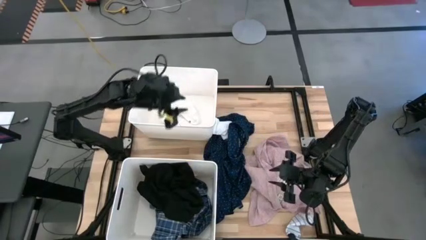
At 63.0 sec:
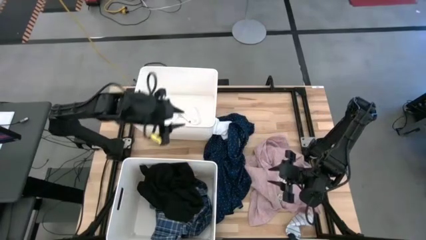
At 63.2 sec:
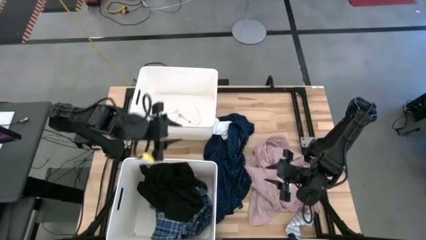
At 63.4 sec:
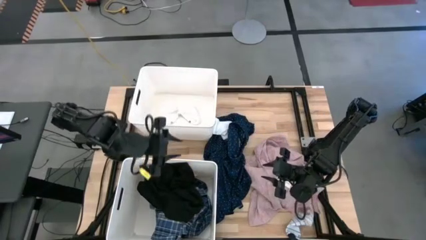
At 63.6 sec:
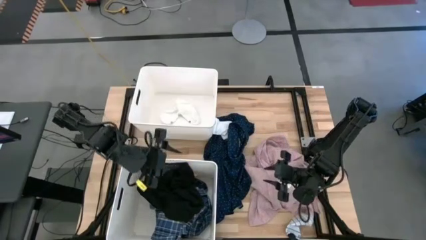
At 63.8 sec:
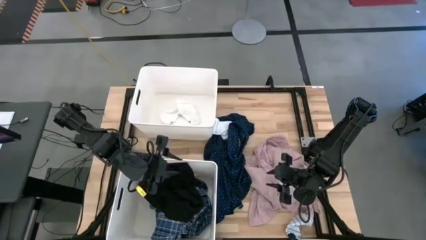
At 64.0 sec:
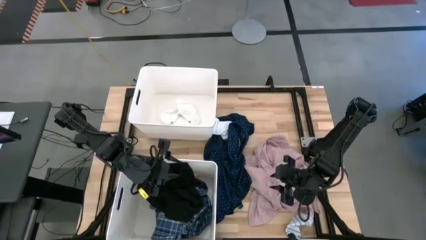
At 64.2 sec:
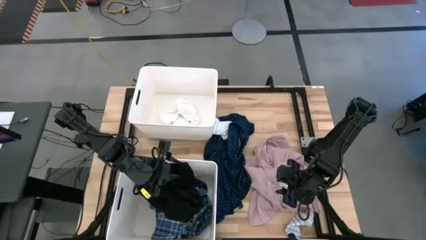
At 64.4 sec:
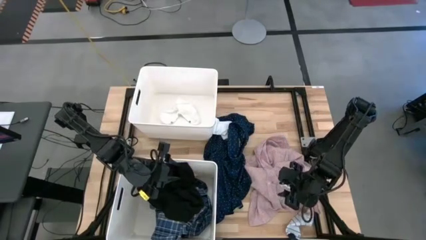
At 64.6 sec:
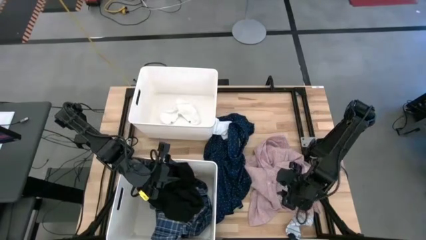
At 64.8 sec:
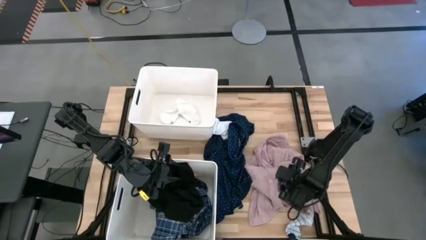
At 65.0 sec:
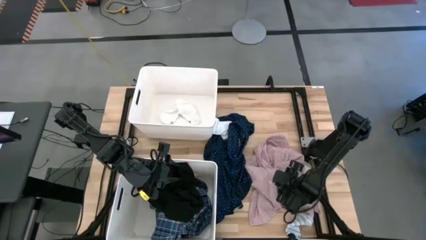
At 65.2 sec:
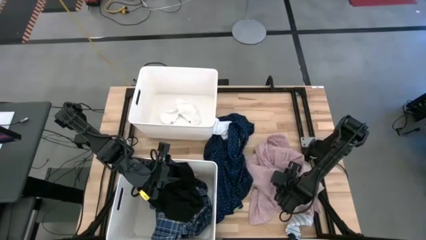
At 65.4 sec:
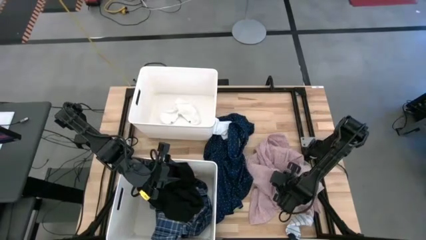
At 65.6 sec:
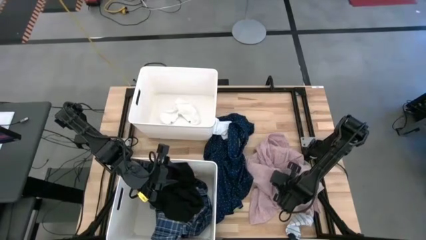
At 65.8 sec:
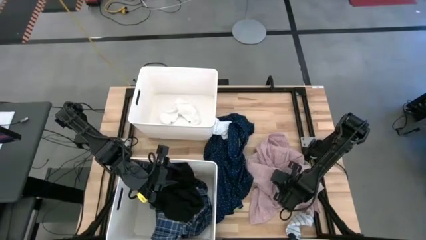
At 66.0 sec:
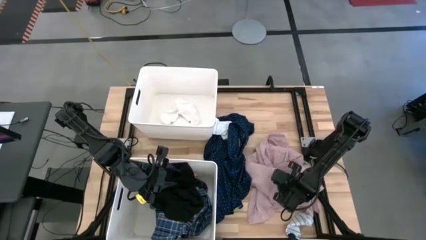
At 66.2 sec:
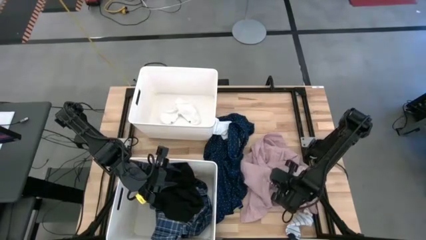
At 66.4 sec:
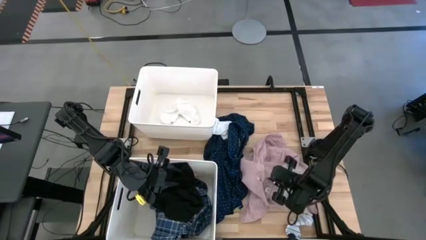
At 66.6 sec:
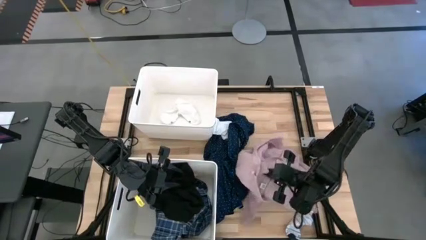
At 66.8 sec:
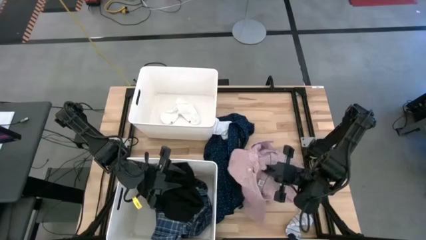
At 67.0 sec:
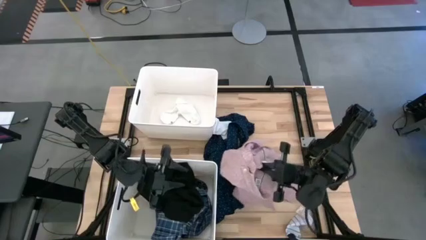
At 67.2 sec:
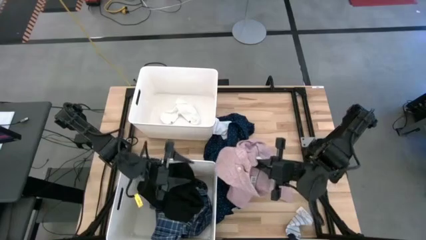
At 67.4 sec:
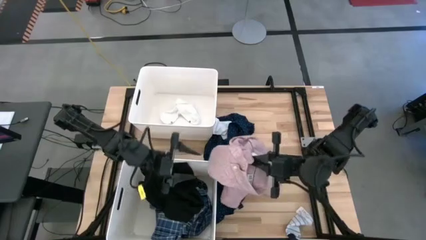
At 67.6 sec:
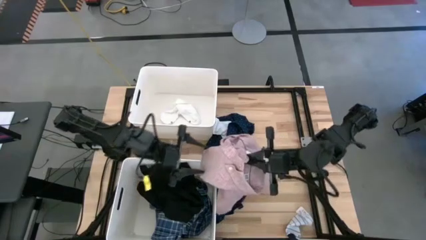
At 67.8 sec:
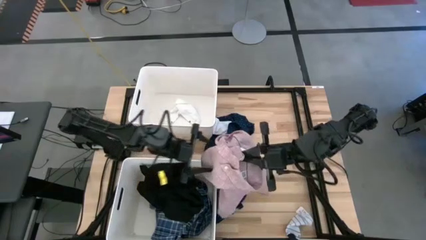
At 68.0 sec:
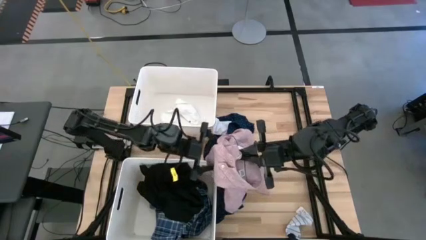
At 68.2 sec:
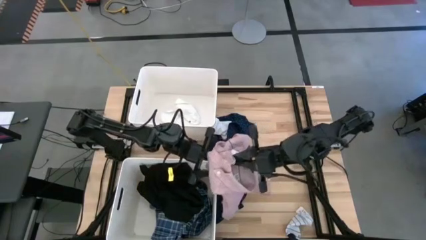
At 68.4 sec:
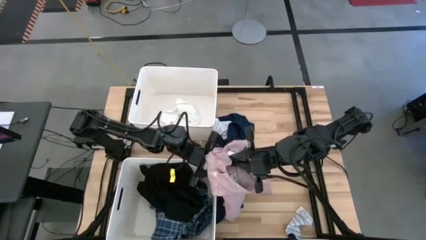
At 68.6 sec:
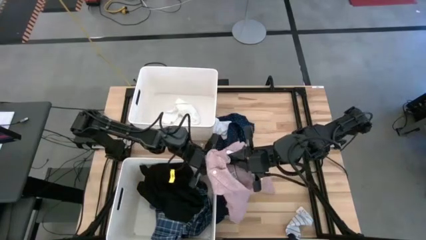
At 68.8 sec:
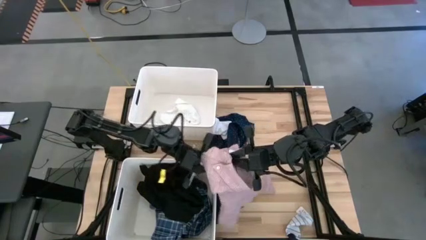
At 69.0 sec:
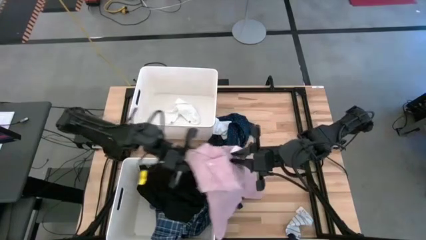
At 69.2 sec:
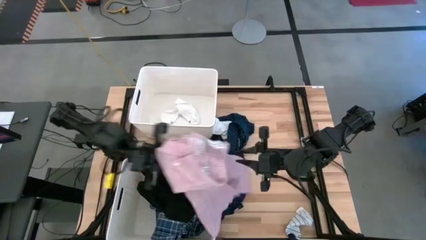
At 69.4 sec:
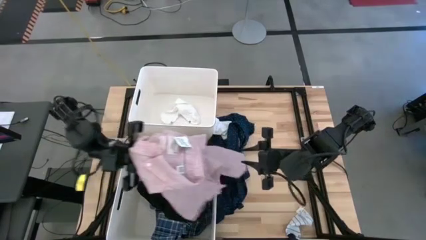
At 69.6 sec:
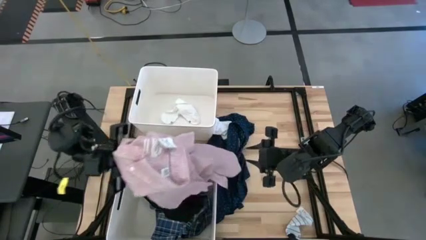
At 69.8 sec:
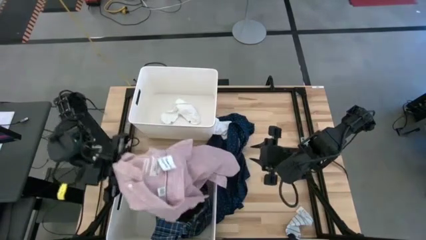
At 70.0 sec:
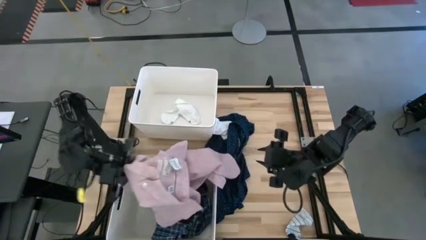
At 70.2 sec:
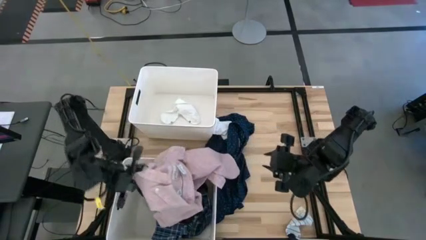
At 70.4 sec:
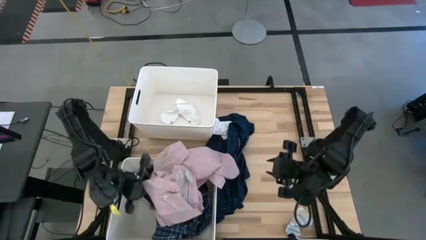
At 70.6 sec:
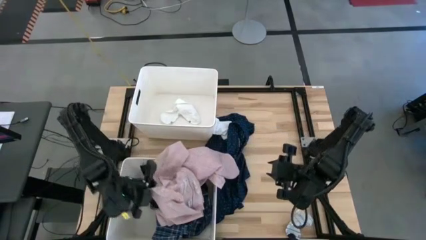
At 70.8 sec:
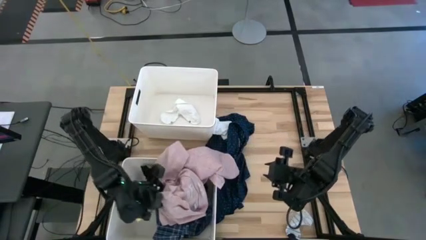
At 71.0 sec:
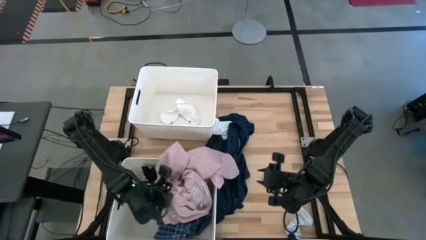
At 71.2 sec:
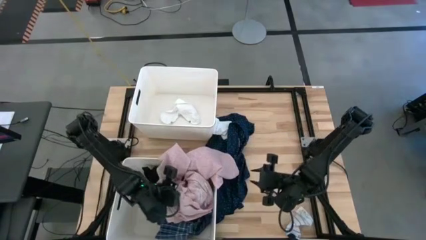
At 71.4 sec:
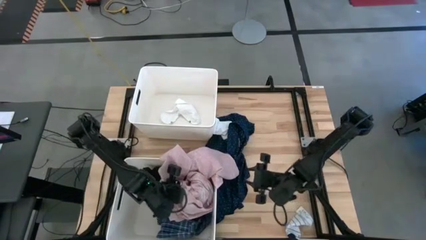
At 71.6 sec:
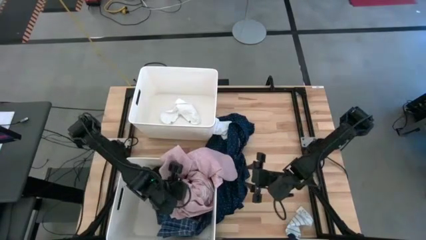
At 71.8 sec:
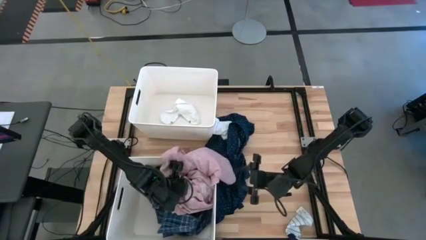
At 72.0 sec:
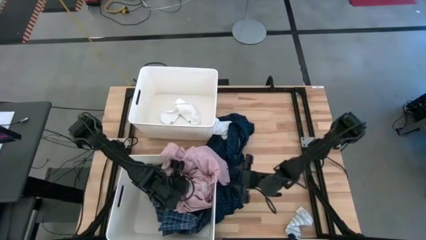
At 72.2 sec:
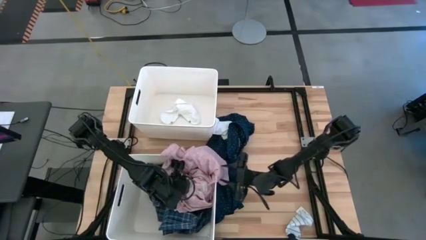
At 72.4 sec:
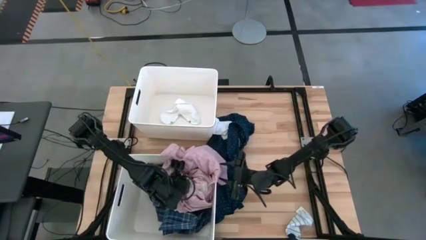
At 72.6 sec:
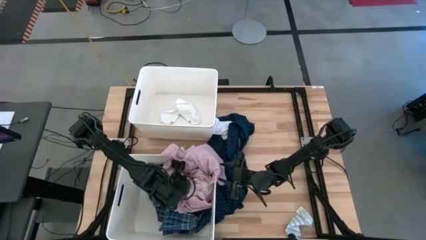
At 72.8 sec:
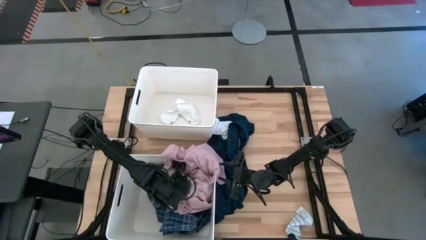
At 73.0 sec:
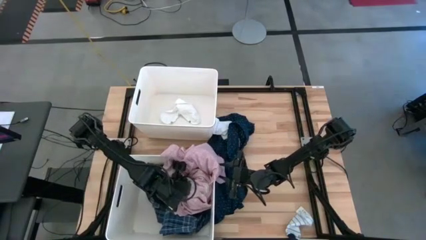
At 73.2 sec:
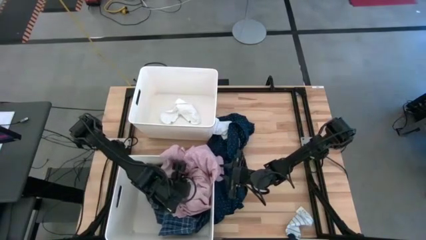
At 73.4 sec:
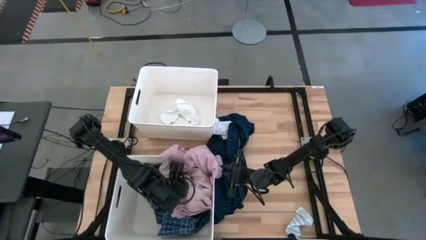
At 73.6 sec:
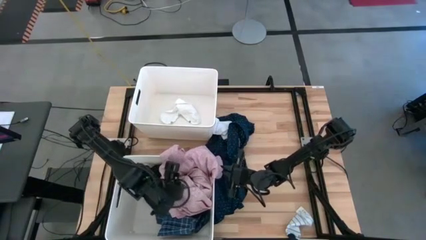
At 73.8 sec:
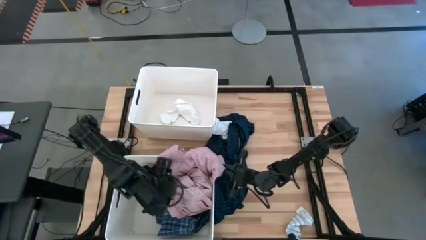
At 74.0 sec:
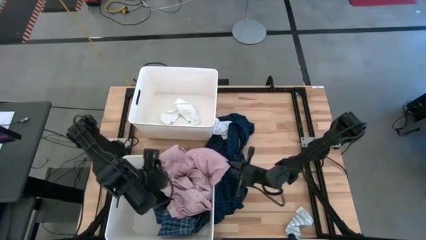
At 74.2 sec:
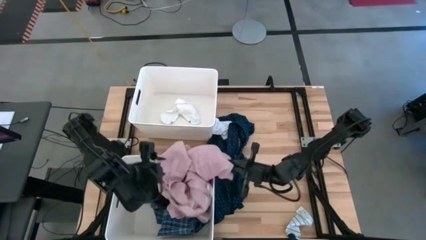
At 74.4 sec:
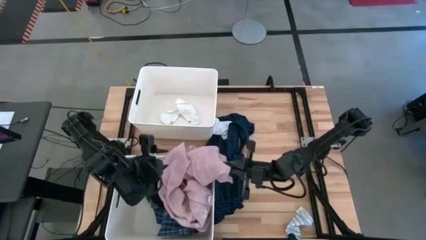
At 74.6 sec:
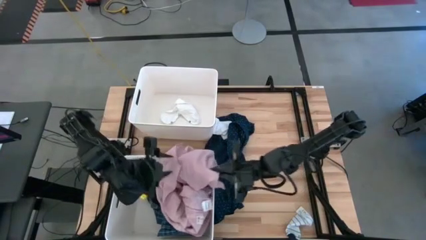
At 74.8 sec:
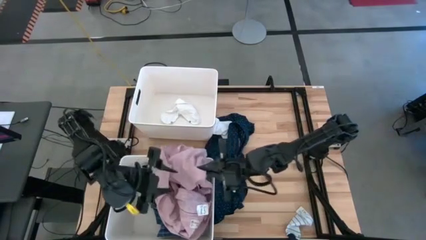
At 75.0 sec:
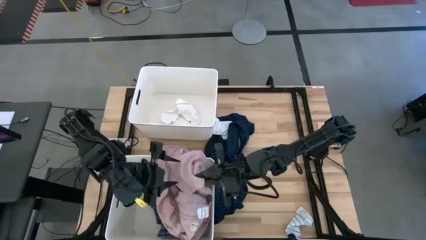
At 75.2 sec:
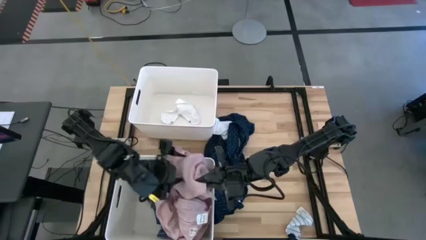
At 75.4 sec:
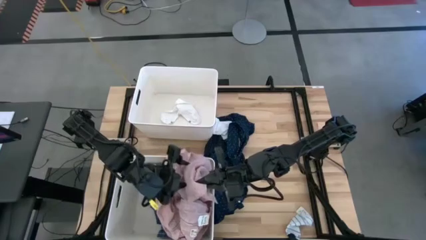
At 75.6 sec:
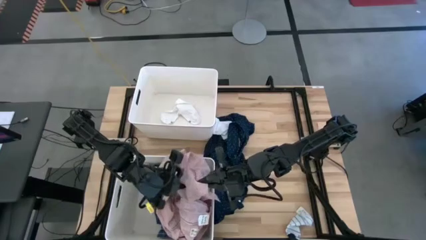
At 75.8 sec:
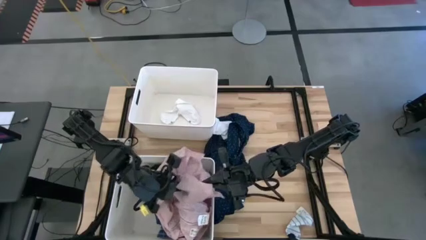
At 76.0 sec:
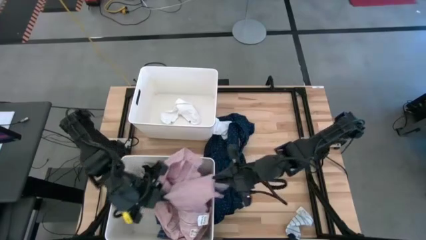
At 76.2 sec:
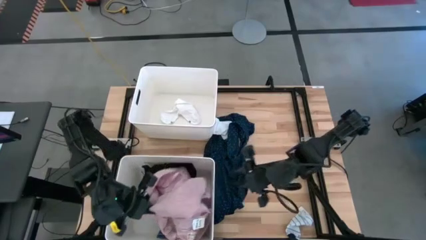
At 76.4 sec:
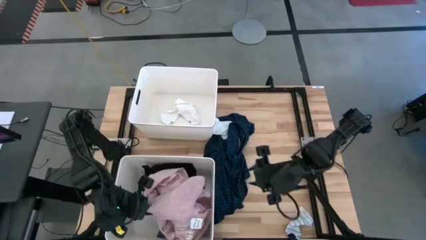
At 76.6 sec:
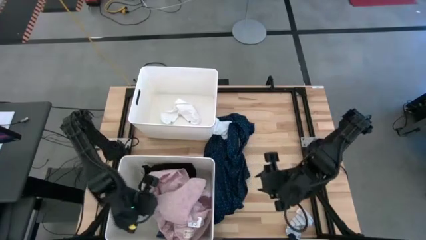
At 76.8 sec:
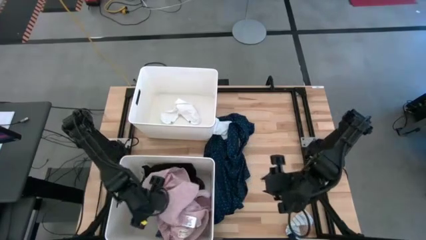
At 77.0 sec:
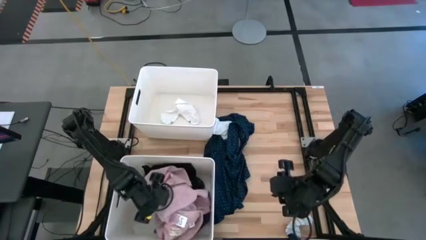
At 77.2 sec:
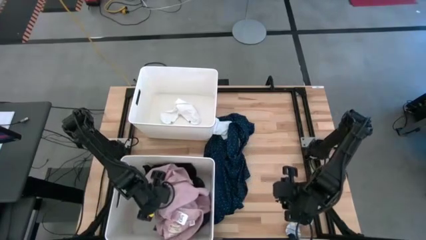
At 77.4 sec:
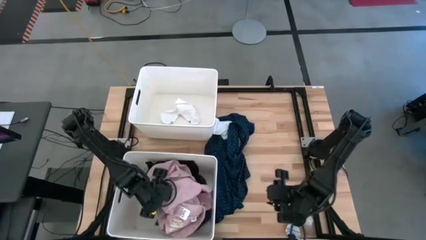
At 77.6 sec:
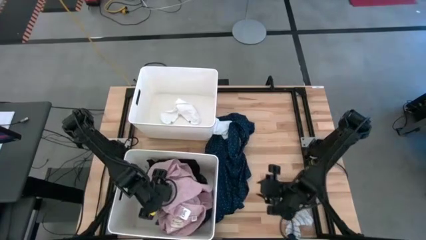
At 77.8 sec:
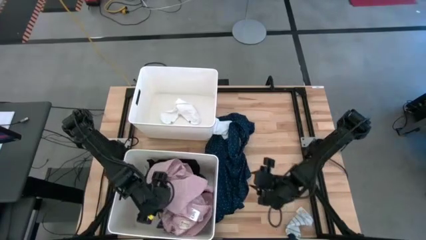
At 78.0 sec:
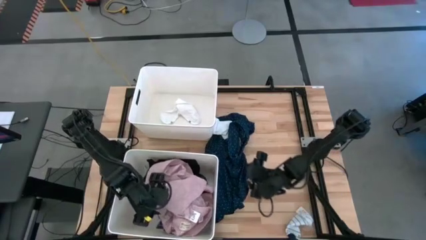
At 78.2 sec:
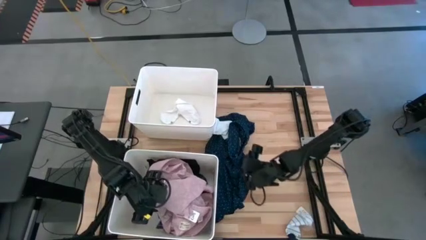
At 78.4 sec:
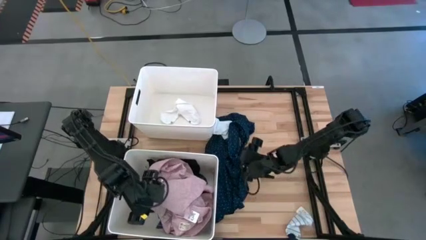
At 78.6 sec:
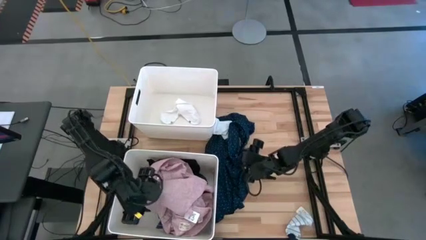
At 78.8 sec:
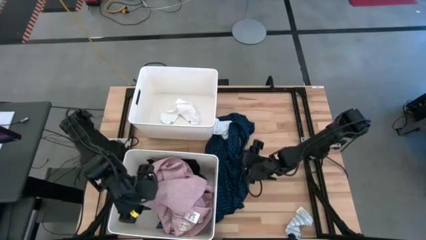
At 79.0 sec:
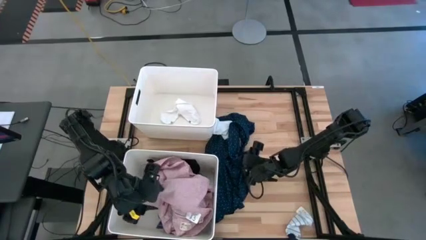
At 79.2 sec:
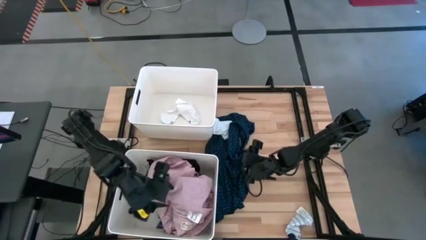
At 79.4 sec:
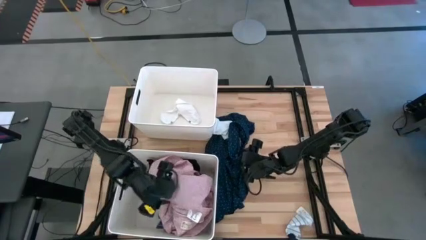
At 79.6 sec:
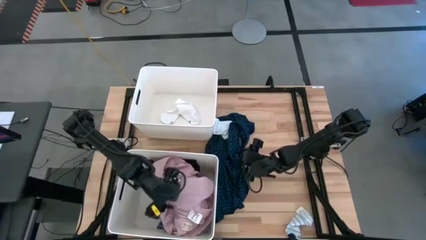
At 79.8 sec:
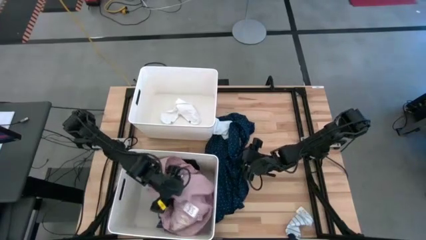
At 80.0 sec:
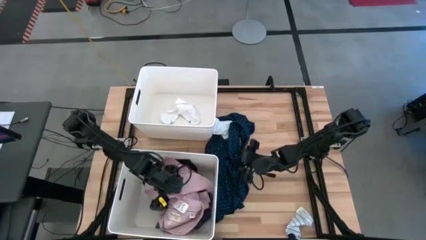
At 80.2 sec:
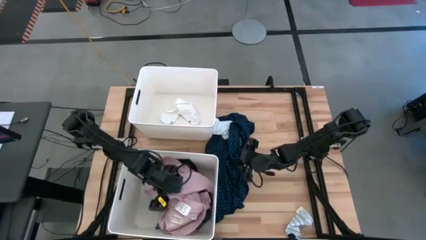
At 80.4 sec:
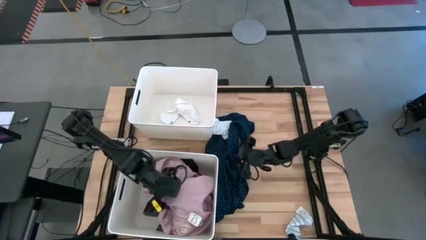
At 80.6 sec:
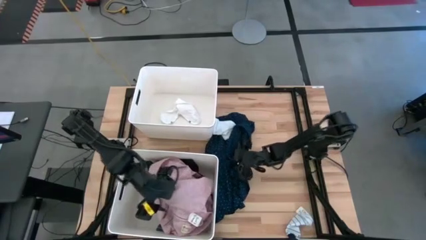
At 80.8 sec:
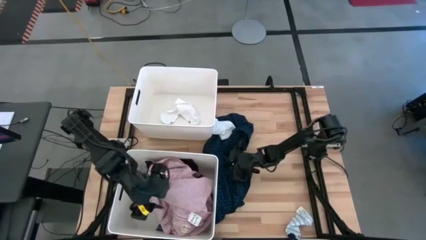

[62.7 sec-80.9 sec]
Task: Sort clothes
Put the pink shirt into the bottom white laundry organizer
